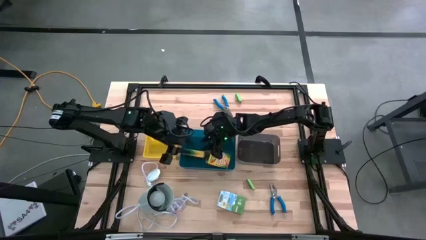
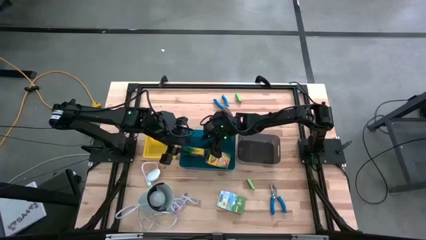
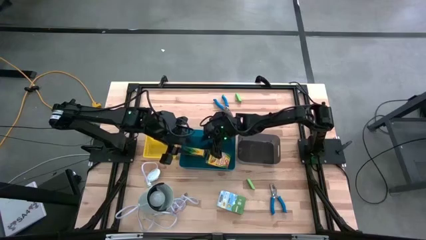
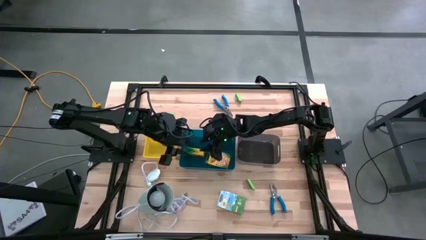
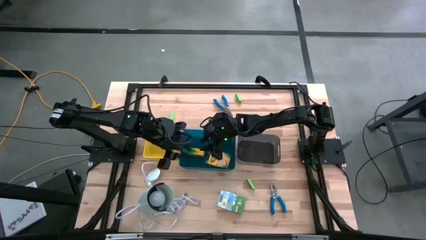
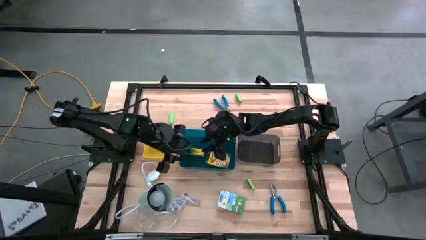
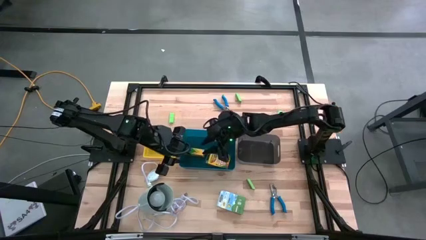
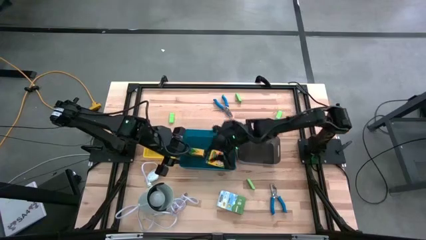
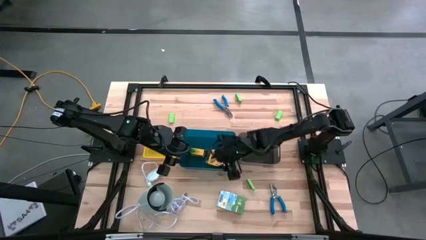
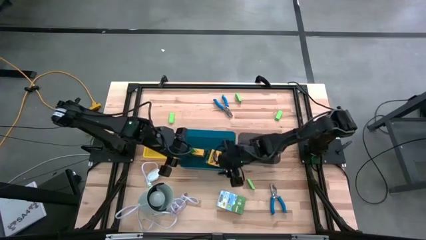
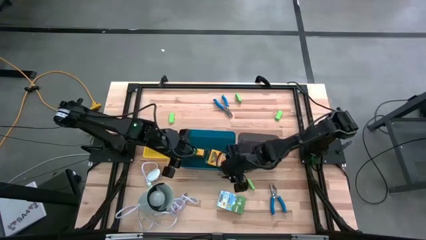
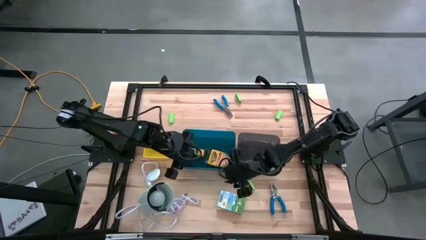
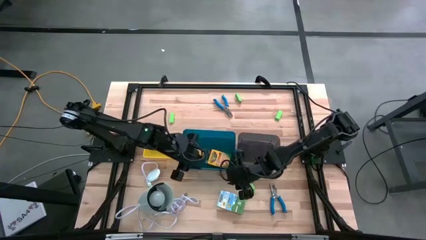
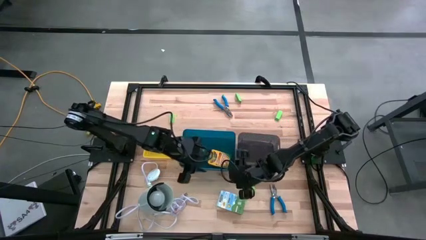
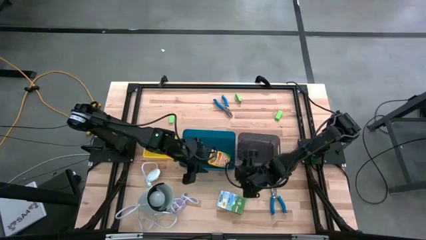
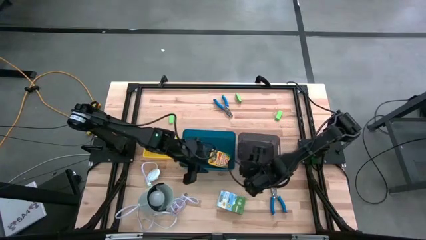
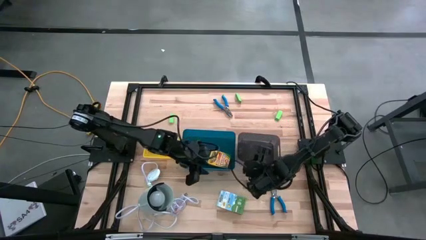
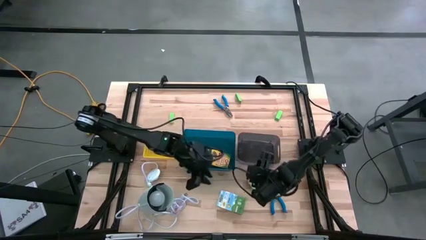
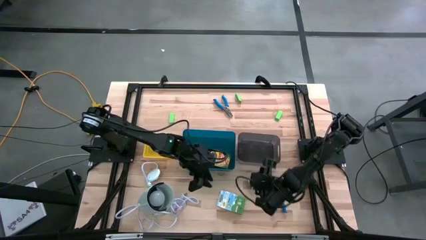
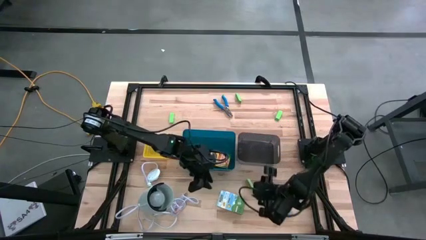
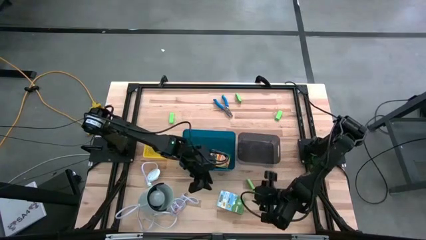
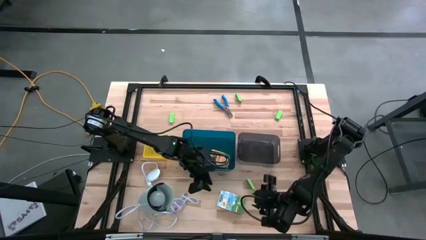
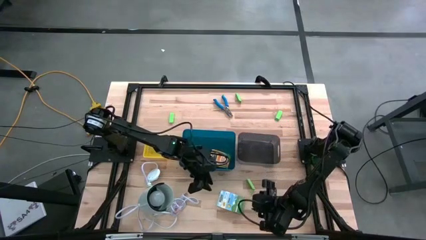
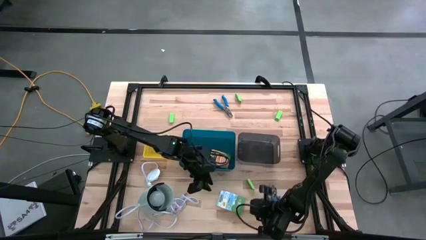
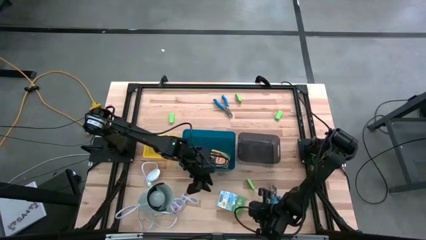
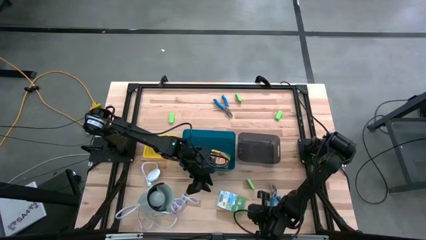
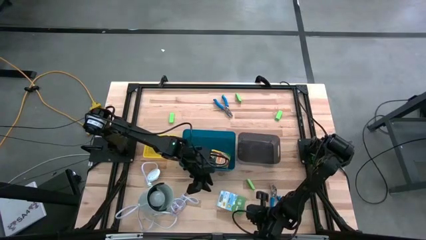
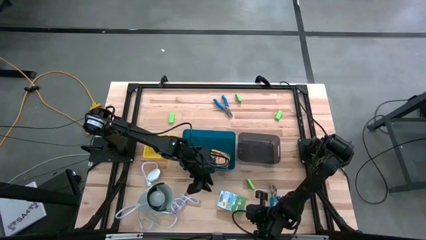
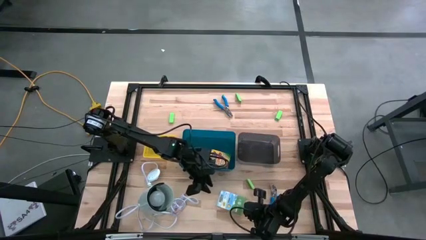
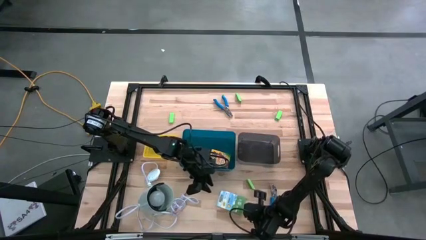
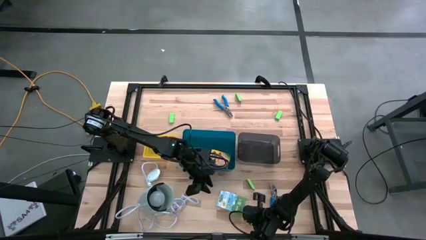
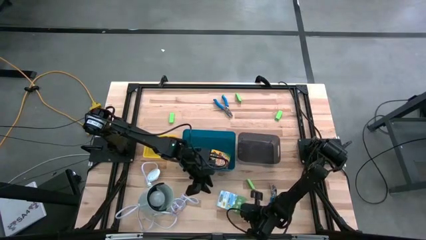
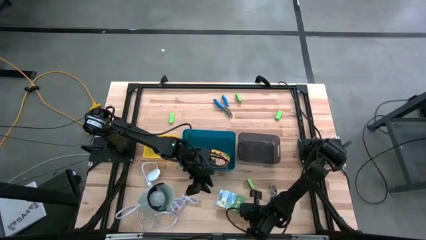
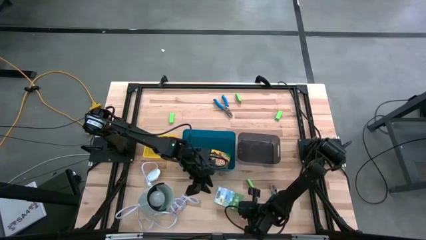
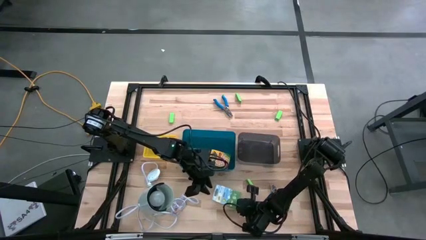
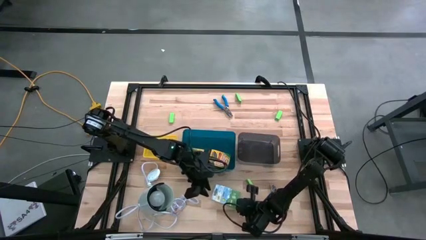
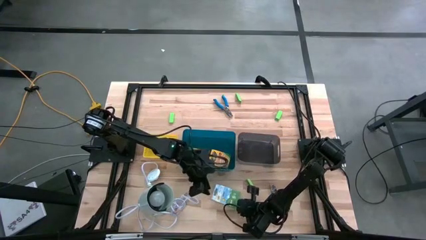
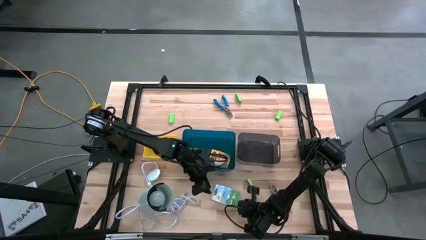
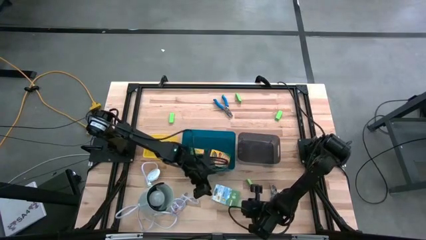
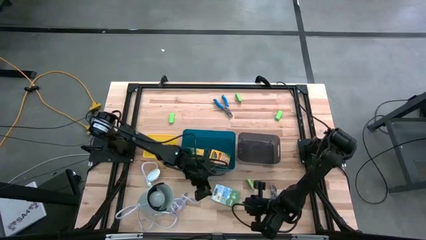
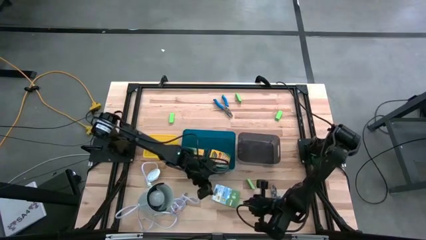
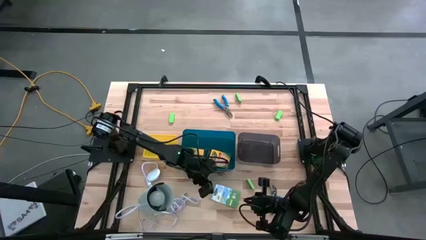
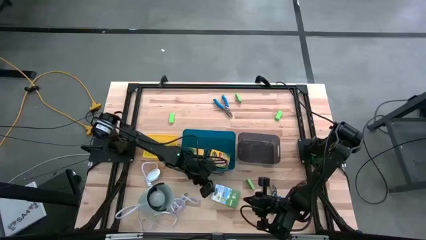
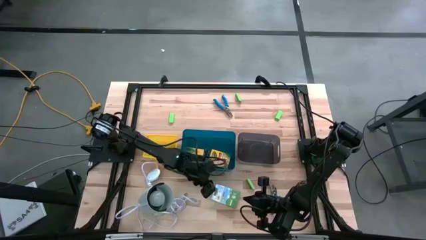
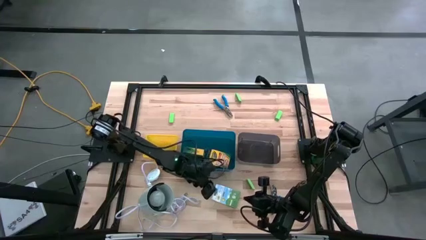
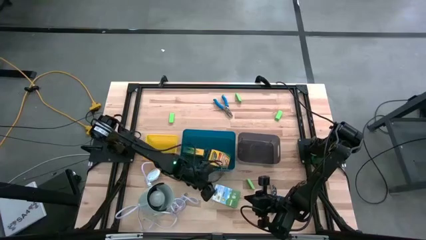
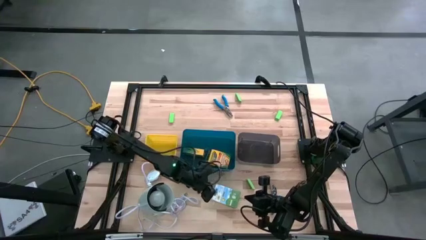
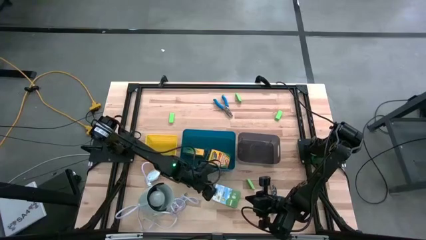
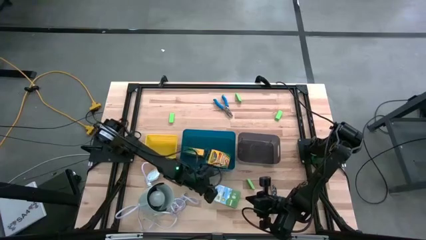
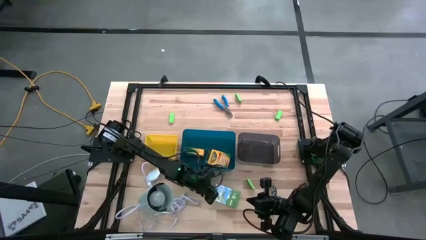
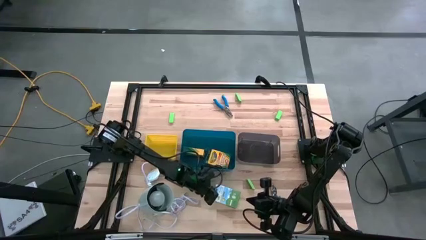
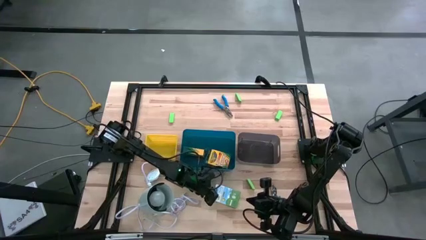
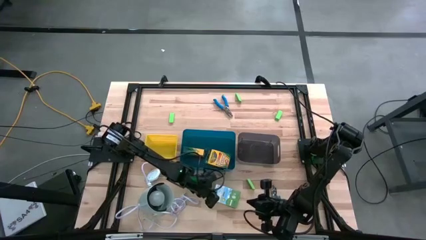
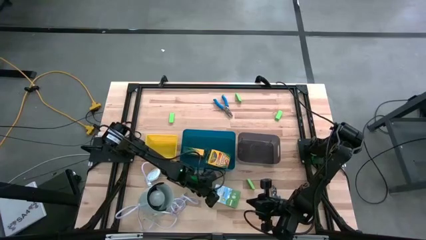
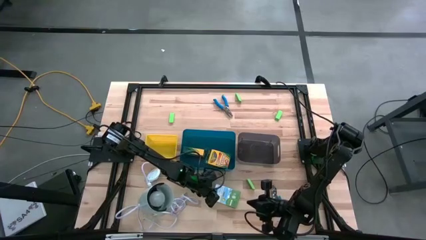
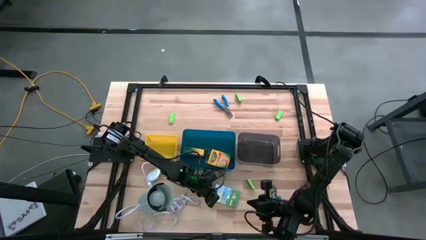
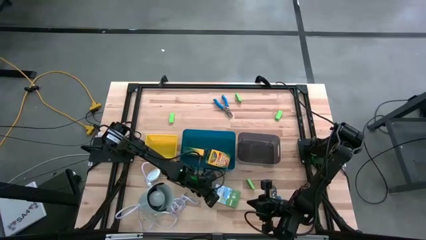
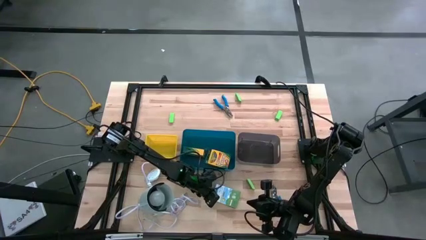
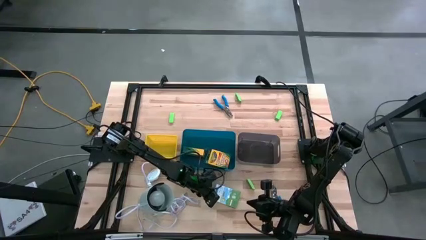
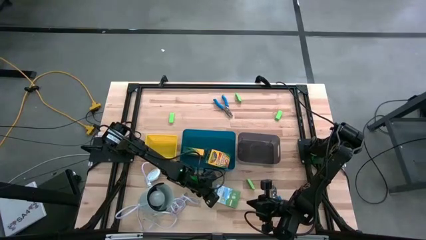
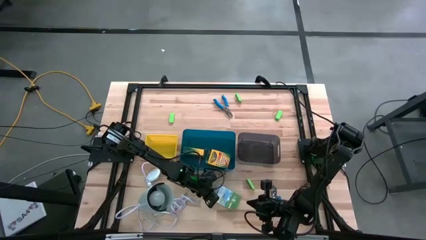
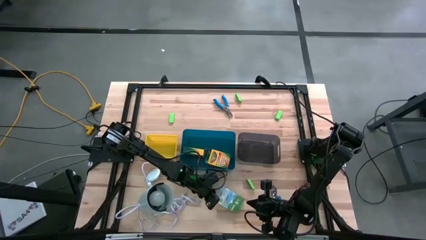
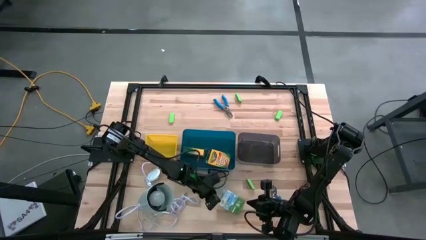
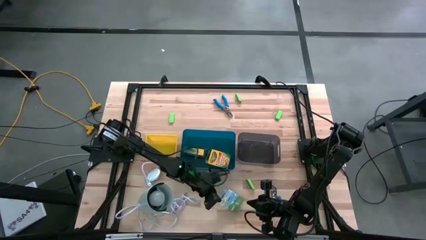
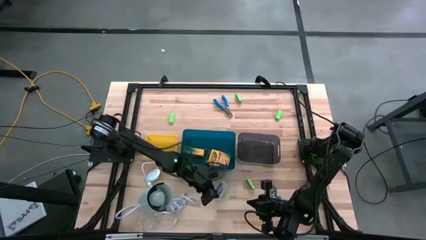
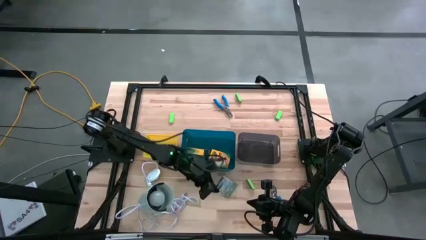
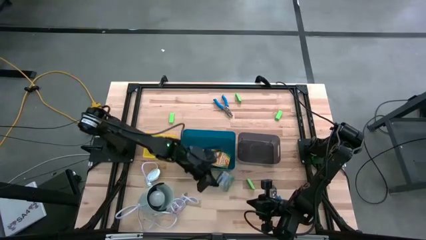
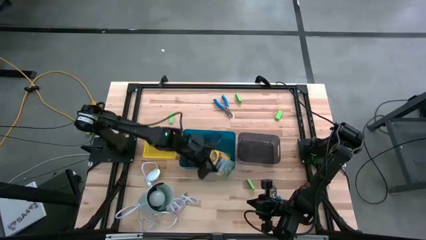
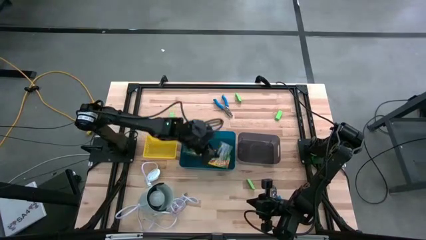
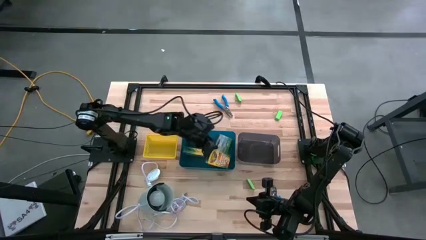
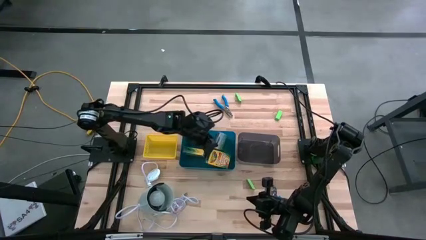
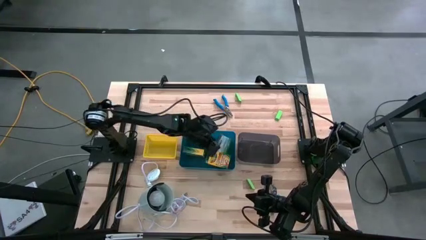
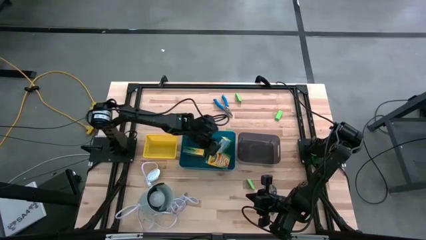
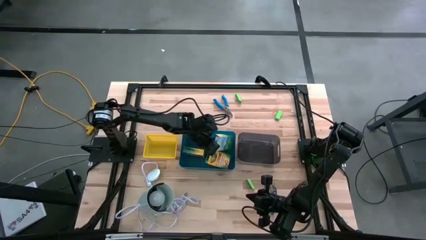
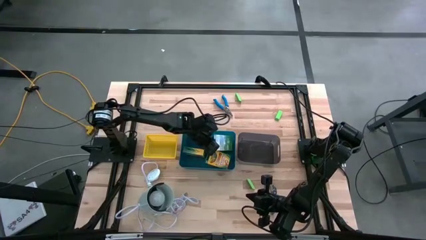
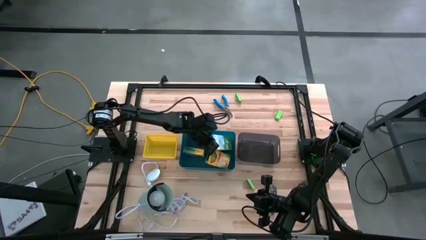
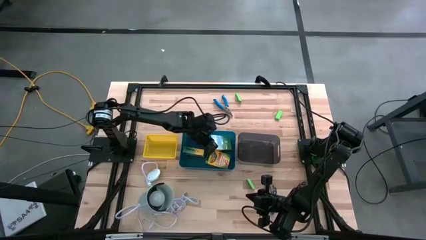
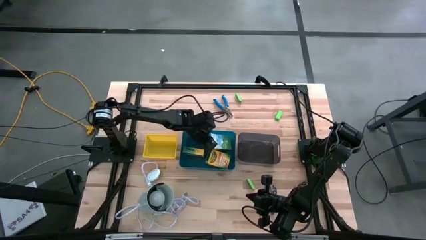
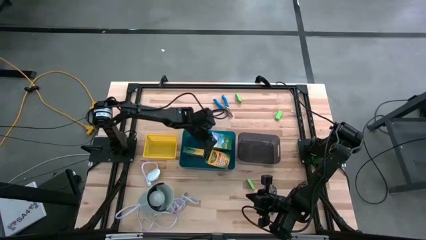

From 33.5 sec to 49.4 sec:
Task: Pick & Place School Supplies
Put the yellow box of crayons into the blue bin
